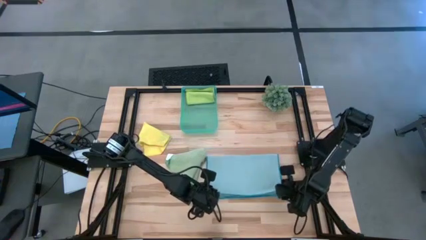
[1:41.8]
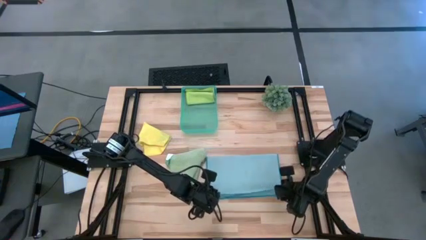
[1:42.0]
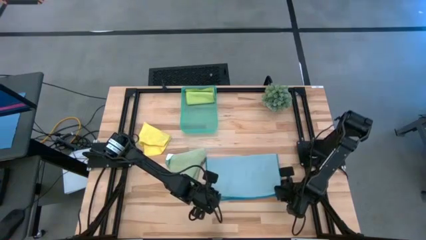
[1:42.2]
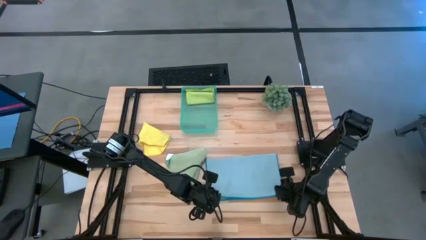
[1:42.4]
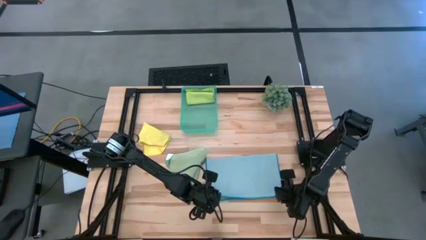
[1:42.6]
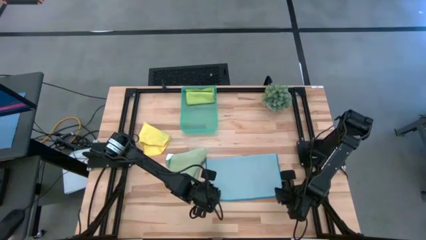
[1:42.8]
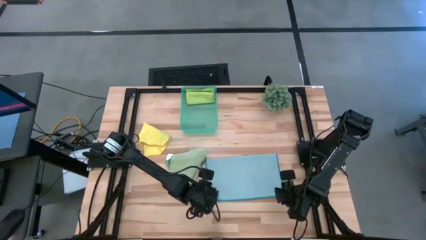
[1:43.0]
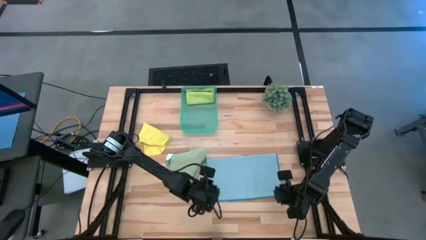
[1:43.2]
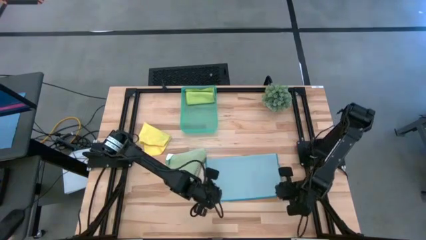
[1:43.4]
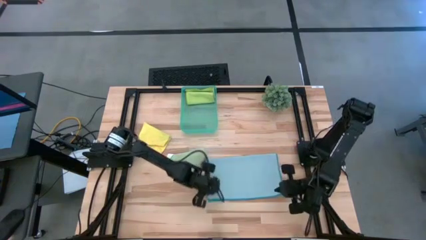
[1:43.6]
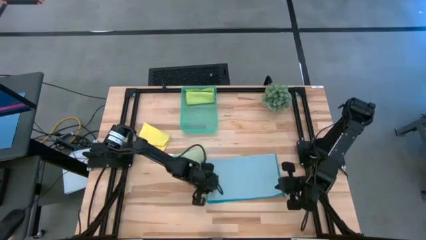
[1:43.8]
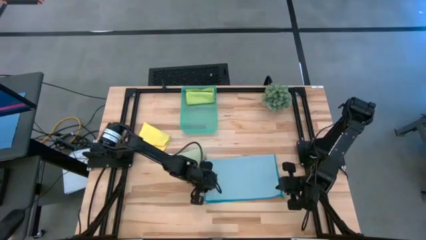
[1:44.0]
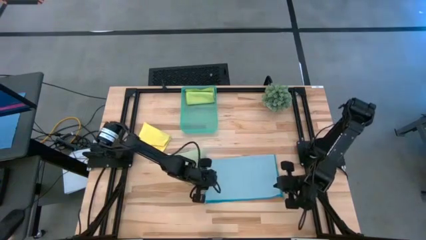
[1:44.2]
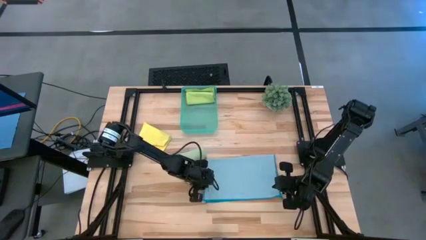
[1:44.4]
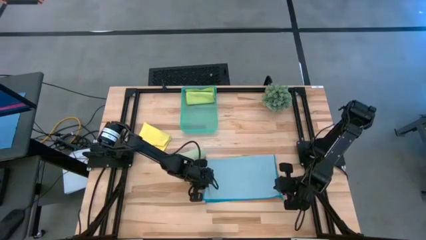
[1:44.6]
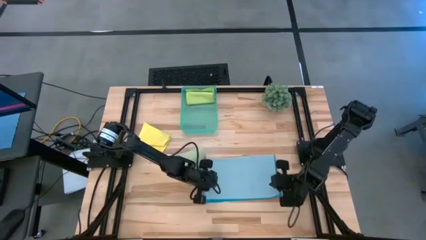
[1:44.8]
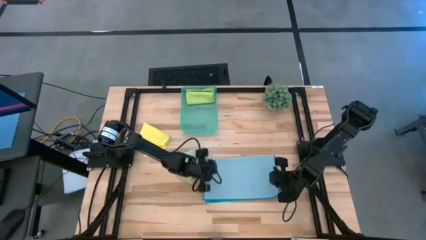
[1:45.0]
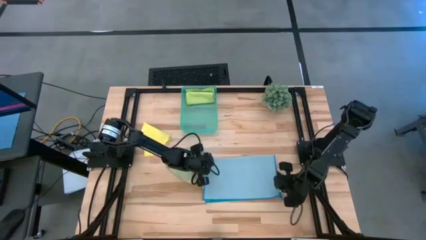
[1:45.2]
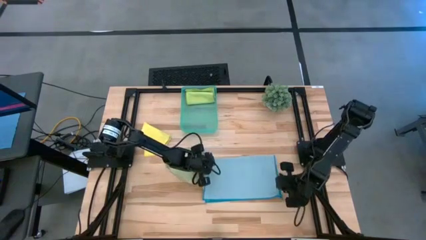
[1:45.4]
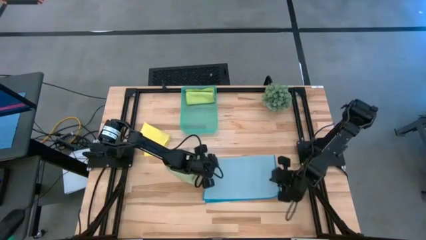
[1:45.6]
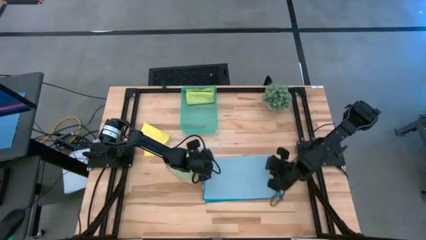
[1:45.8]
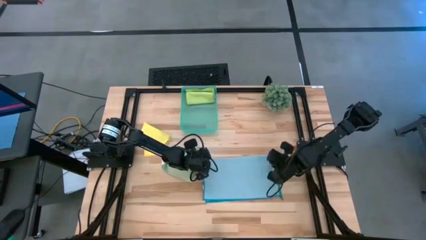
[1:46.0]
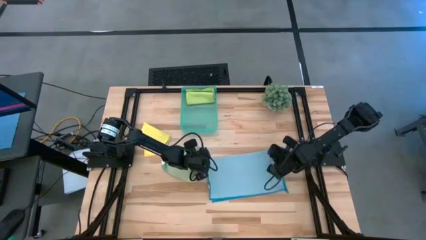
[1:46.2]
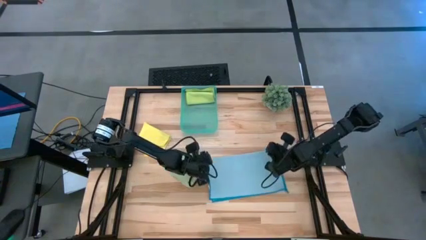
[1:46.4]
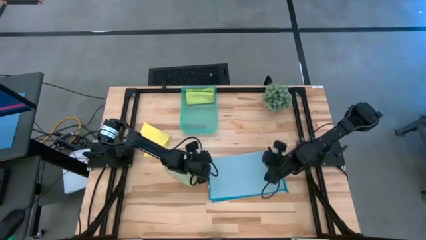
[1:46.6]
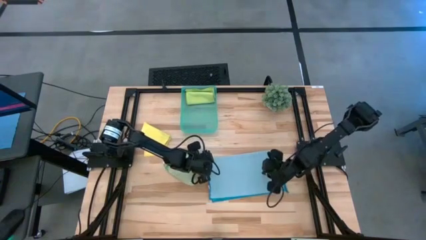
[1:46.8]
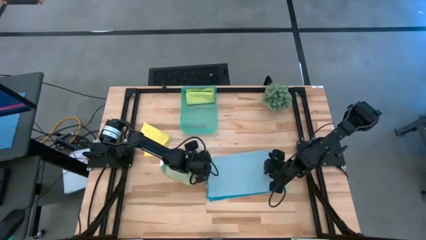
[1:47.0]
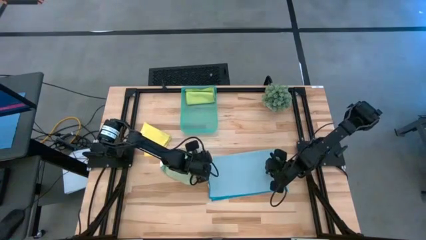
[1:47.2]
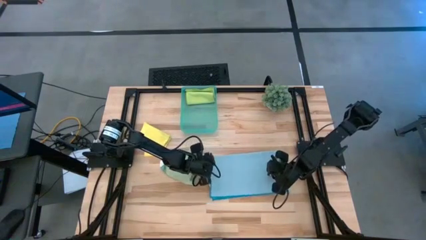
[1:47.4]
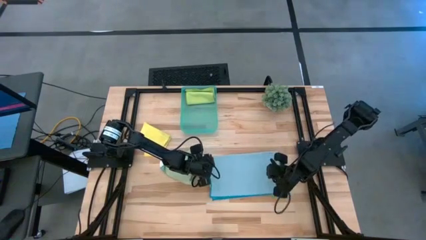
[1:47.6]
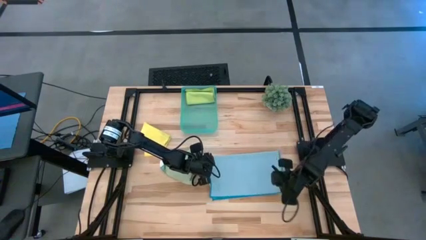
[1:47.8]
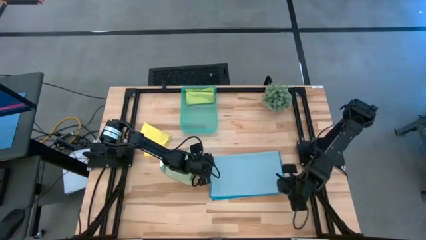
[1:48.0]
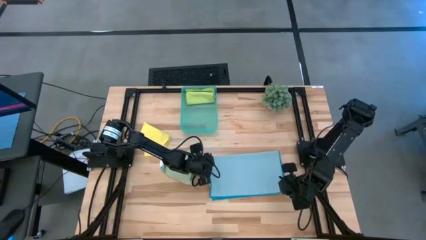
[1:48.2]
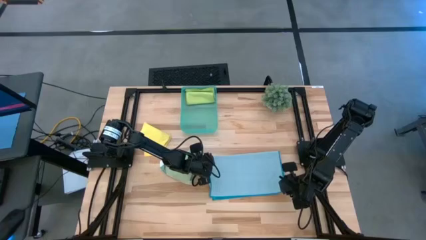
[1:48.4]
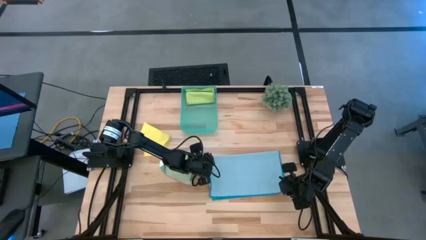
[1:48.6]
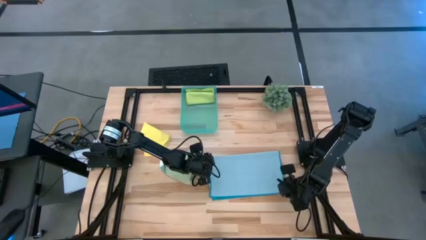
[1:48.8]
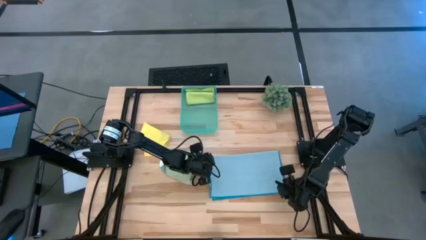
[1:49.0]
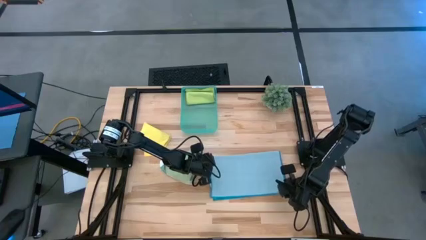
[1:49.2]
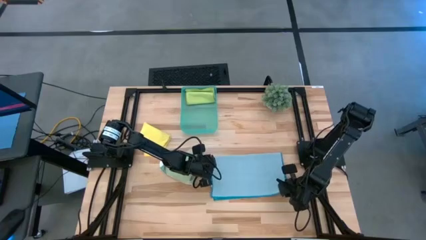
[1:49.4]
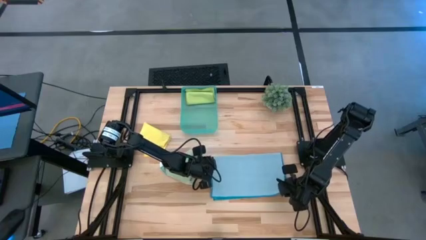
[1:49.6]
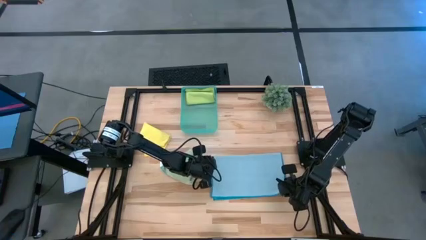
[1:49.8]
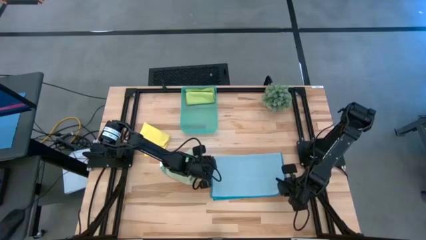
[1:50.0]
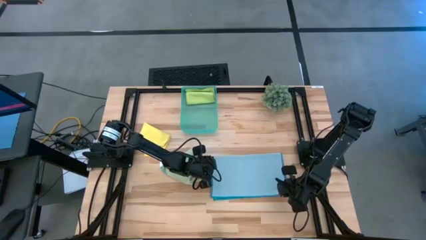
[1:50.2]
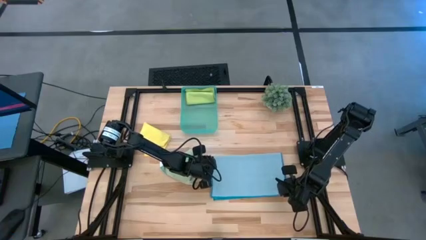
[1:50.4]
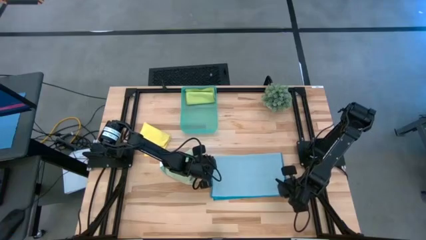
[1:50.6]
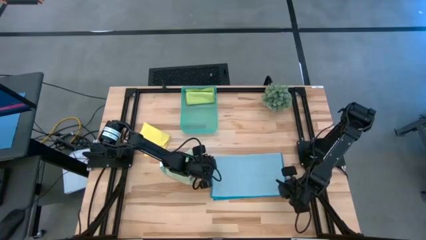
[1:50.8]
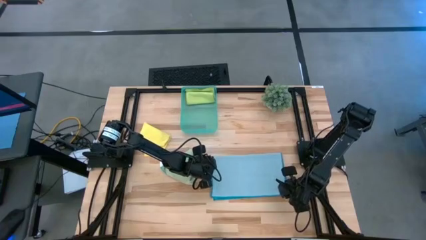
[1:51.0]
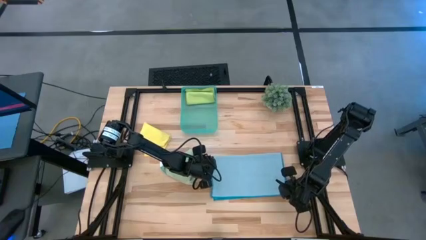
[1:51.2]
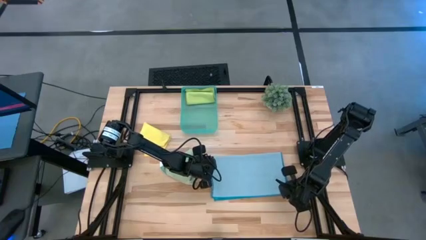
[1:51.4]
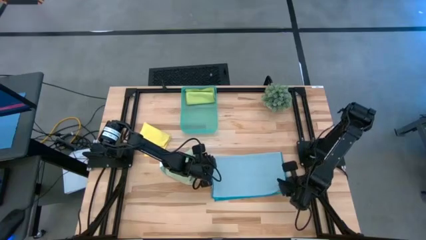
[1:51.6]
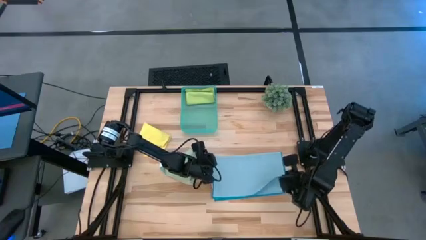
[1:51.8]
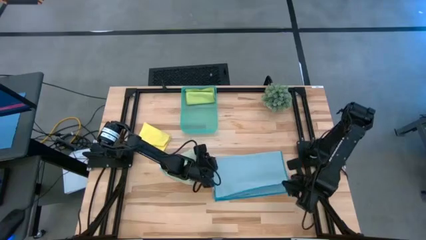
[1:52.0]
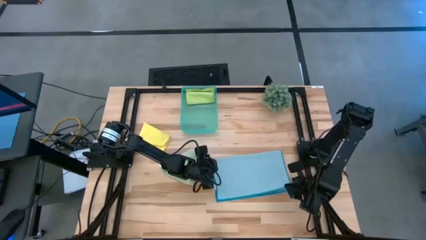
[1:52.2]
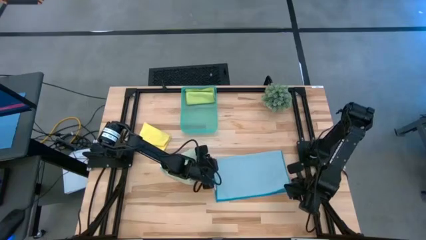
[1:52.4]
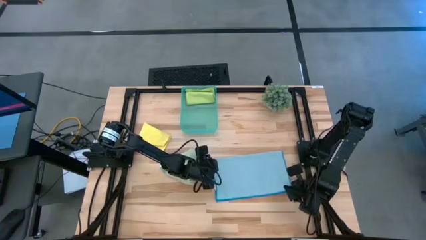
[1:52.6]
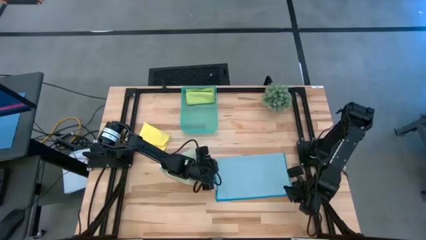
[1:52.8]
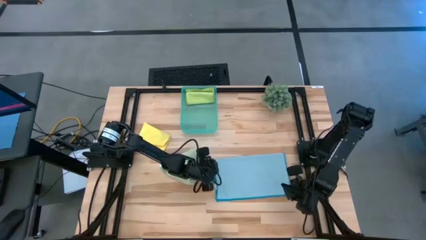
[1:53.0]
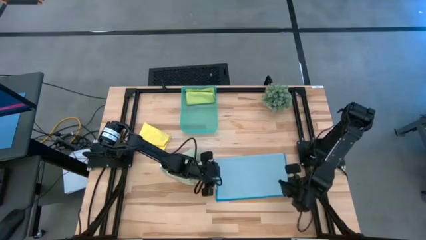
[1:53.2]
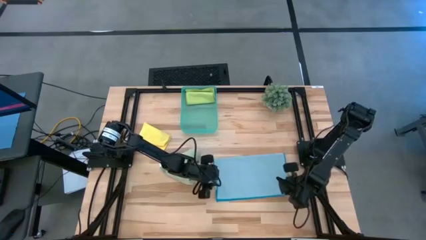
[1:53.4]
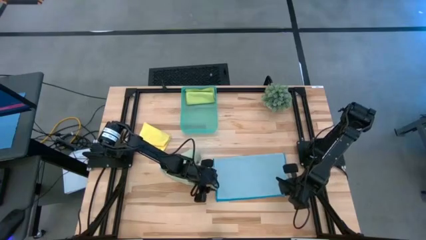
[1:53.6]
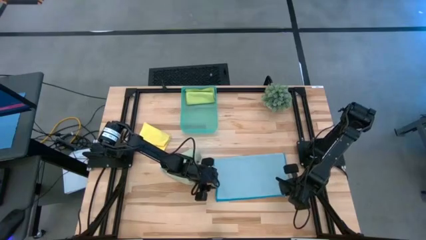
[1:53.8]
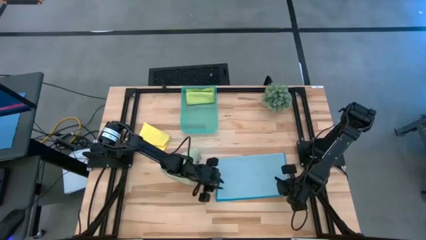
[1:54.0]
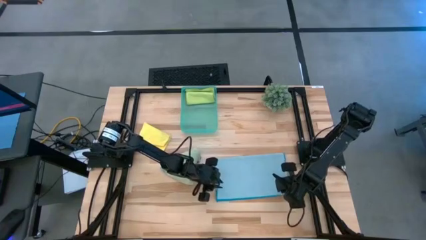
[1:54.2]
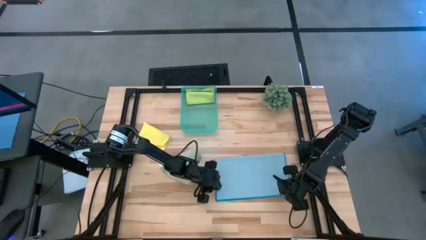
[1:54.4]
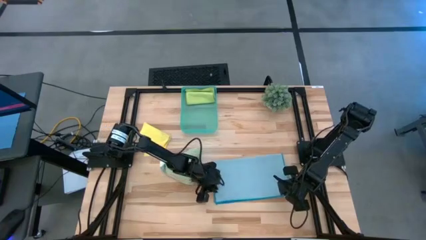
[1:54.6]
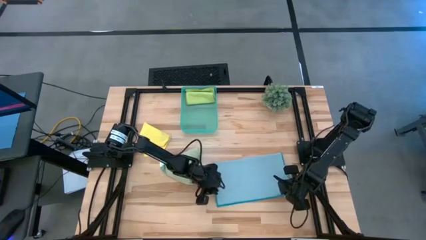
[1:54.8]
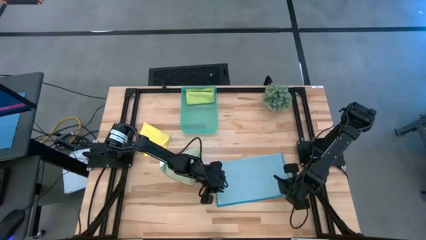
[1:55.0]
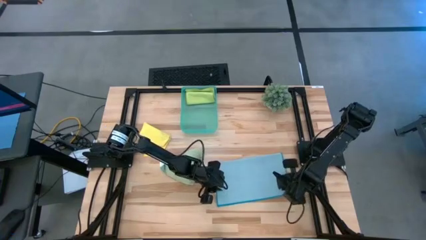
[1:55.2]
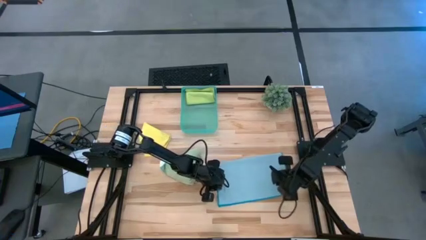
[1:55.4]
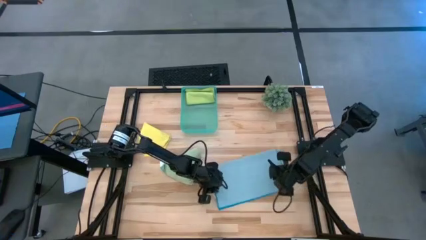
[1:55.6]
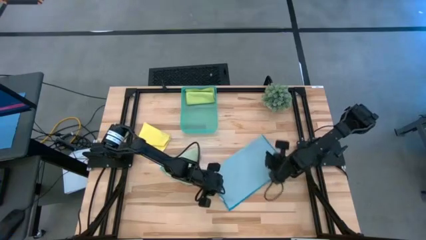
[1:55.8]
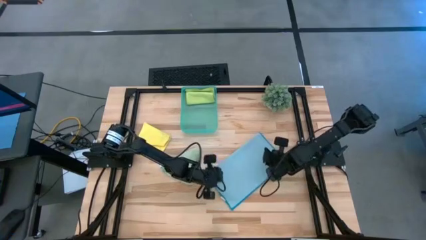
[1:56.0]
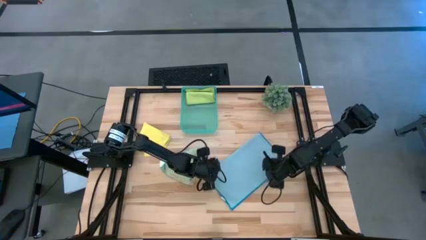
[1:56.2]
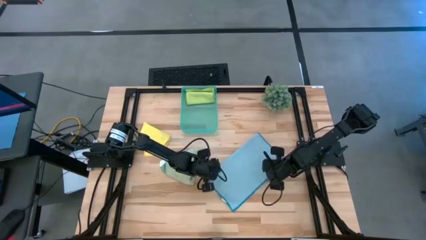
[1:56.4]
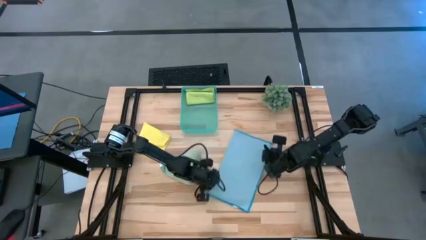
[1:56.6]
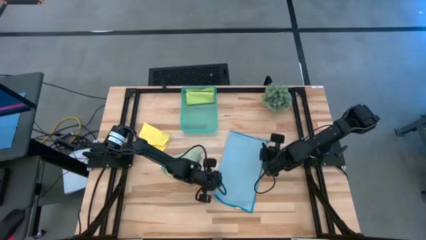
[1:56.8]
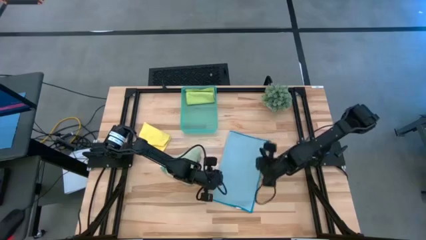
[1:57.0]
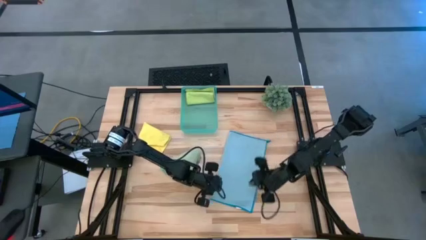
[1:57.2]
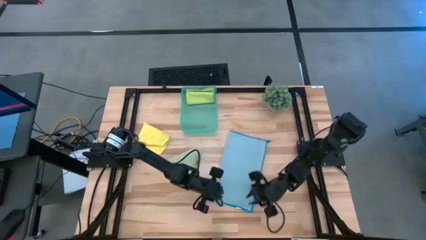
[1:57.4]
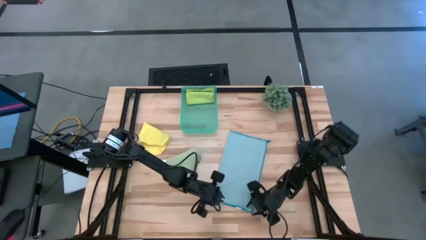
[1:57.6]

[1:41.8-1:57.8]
Task: Fold microfiber towels
Fold the blue microfiber cloth
